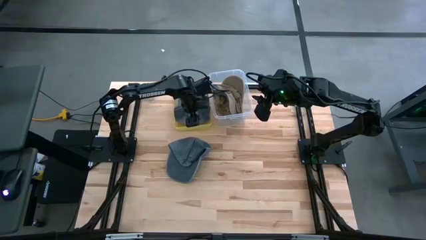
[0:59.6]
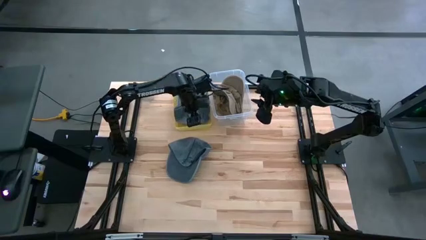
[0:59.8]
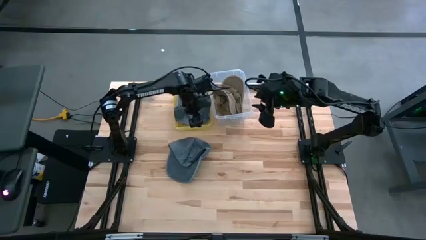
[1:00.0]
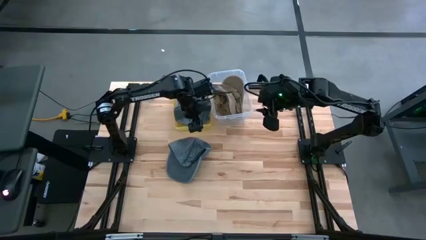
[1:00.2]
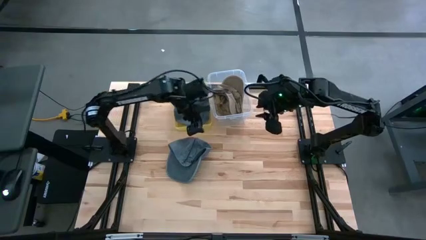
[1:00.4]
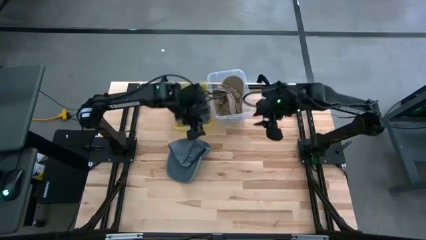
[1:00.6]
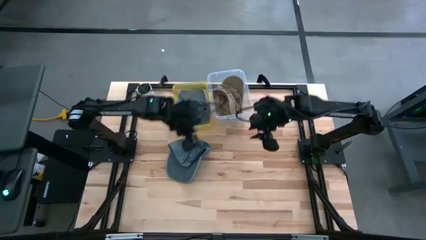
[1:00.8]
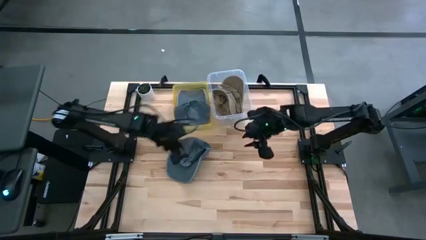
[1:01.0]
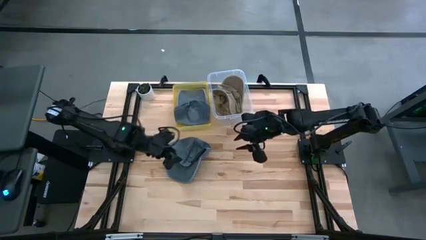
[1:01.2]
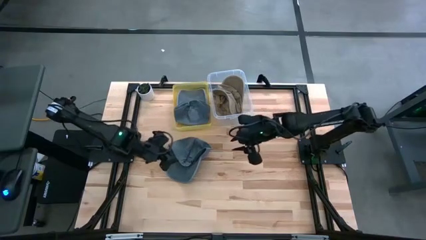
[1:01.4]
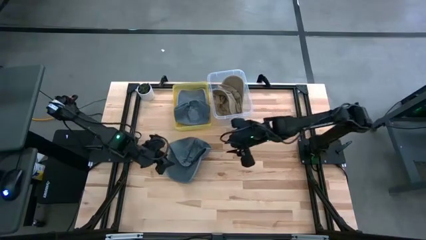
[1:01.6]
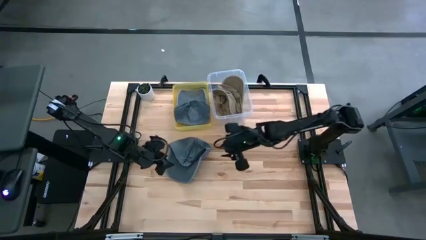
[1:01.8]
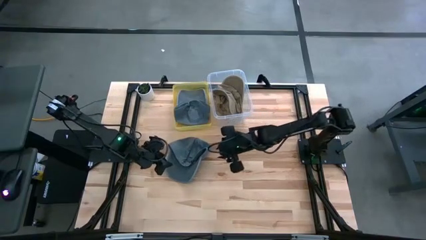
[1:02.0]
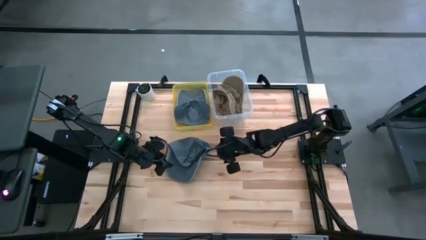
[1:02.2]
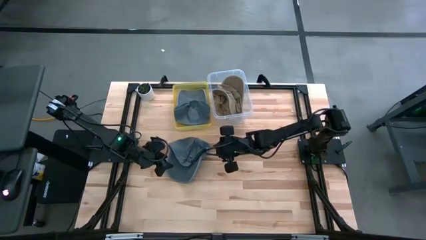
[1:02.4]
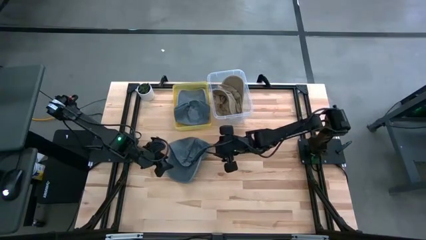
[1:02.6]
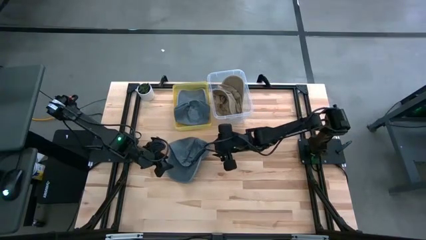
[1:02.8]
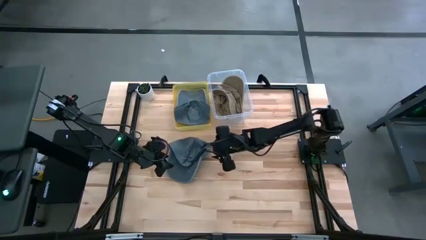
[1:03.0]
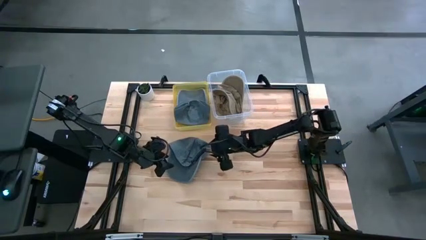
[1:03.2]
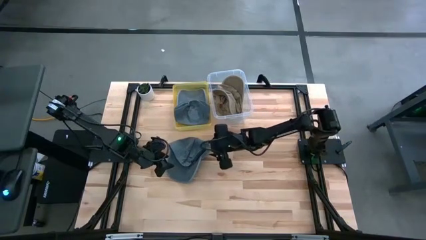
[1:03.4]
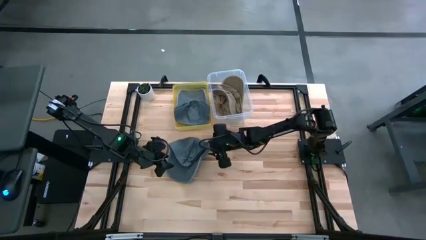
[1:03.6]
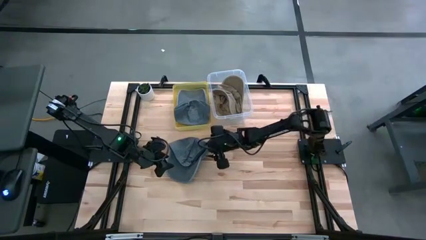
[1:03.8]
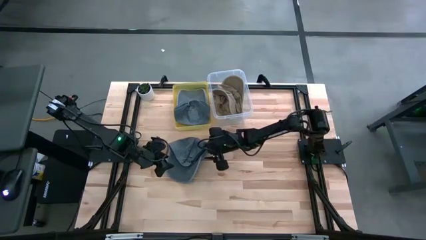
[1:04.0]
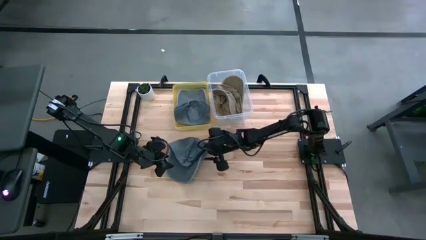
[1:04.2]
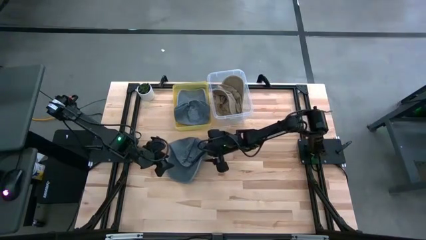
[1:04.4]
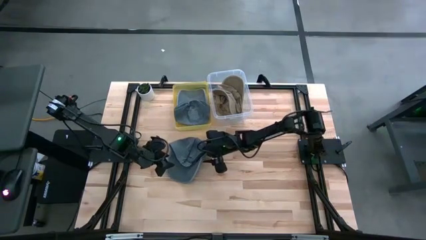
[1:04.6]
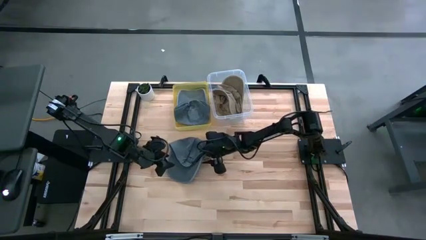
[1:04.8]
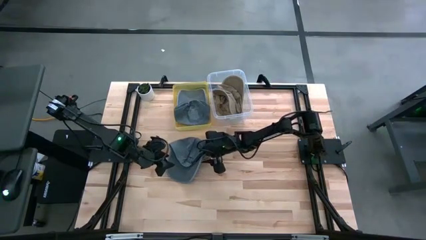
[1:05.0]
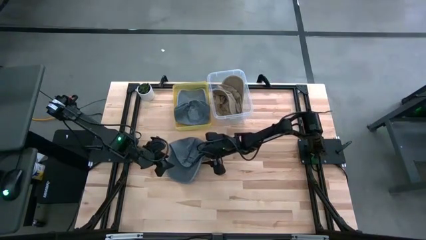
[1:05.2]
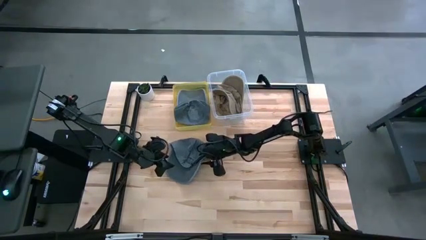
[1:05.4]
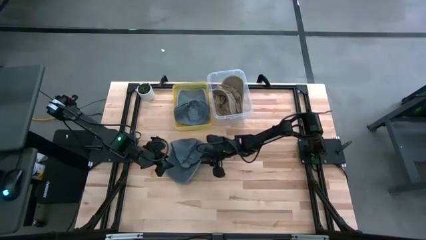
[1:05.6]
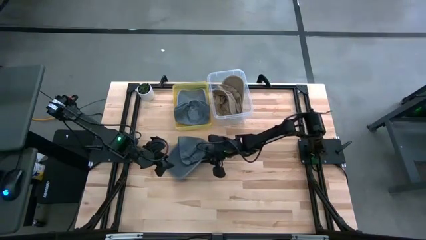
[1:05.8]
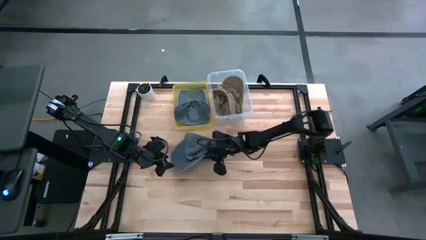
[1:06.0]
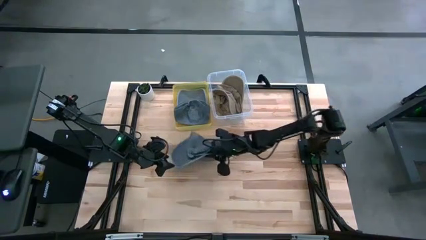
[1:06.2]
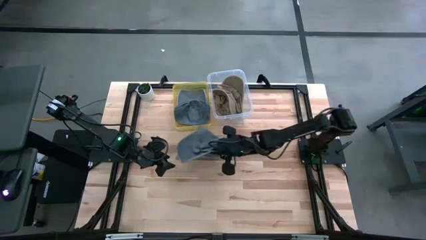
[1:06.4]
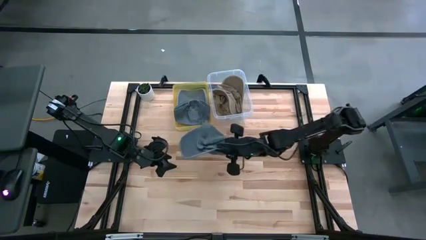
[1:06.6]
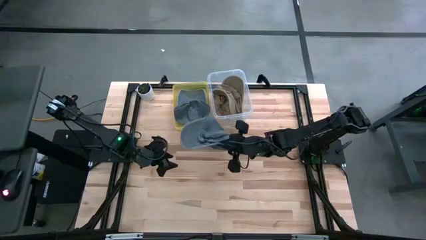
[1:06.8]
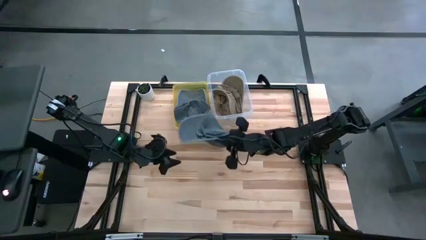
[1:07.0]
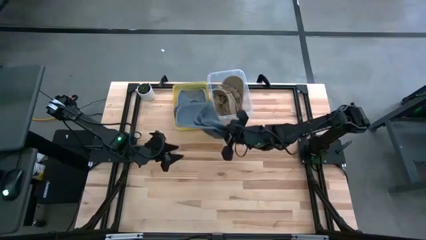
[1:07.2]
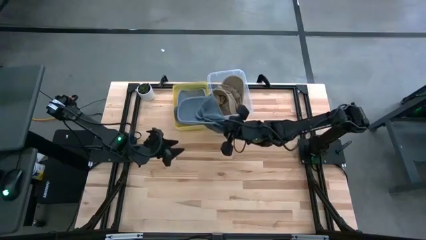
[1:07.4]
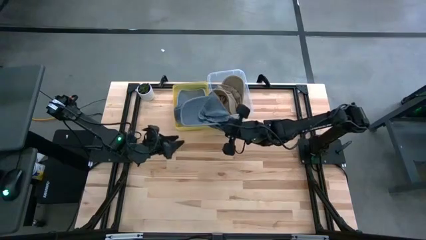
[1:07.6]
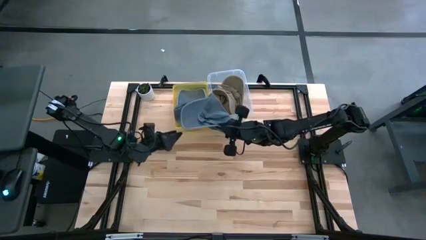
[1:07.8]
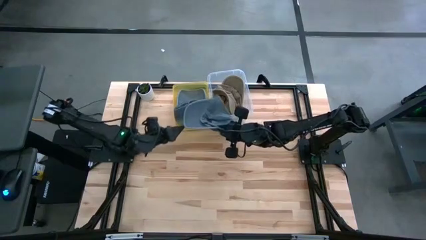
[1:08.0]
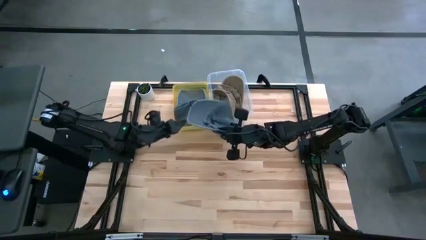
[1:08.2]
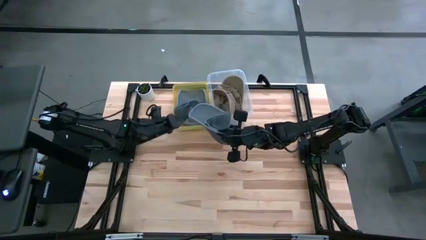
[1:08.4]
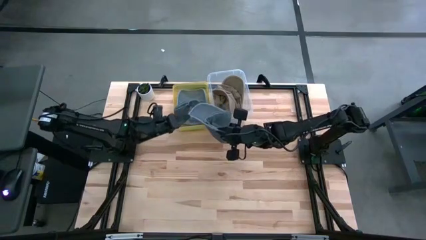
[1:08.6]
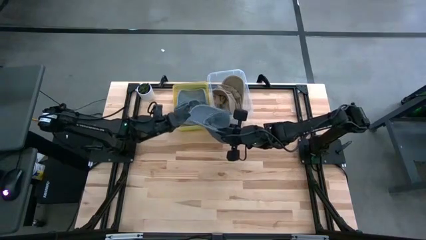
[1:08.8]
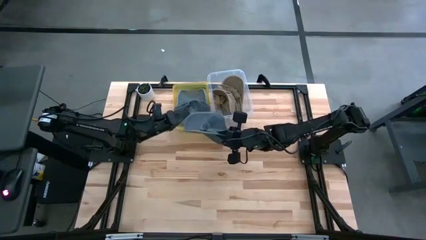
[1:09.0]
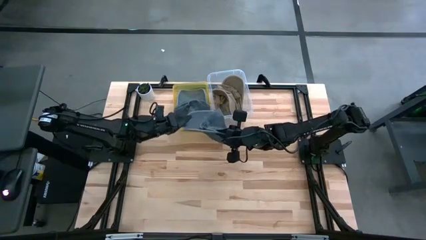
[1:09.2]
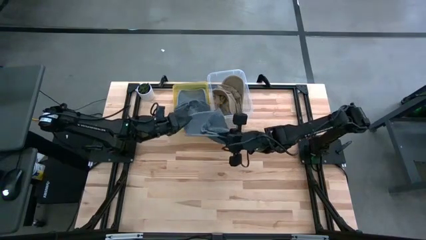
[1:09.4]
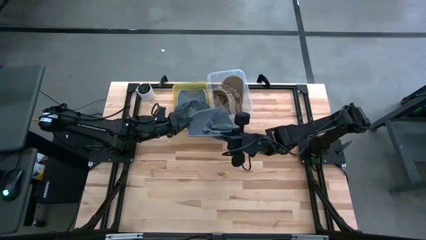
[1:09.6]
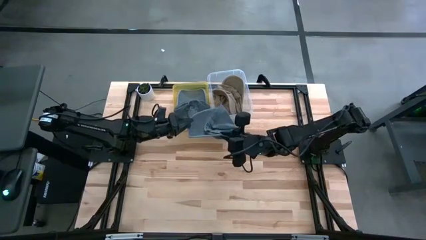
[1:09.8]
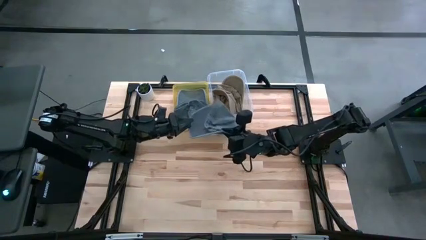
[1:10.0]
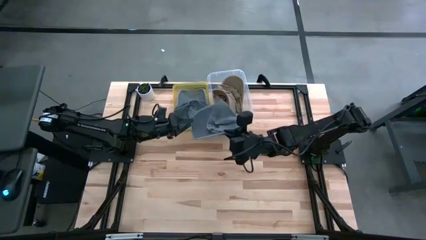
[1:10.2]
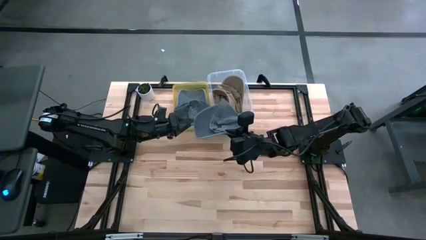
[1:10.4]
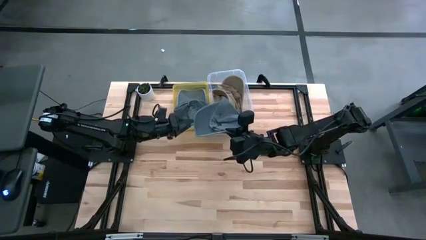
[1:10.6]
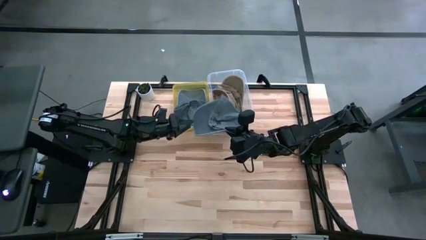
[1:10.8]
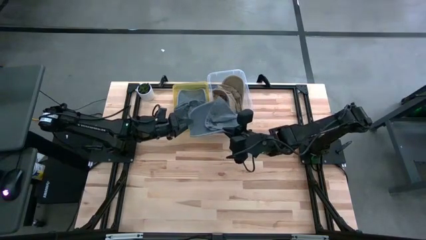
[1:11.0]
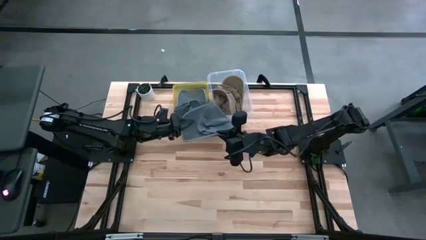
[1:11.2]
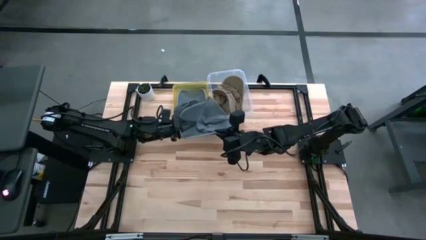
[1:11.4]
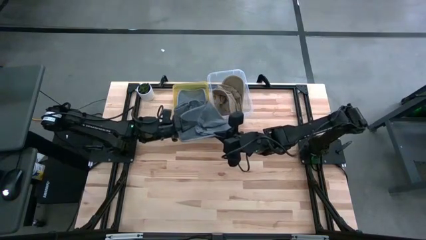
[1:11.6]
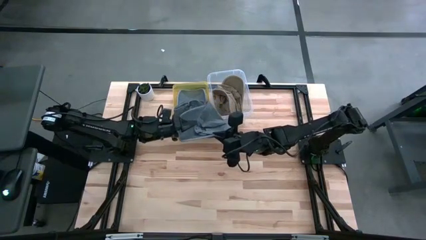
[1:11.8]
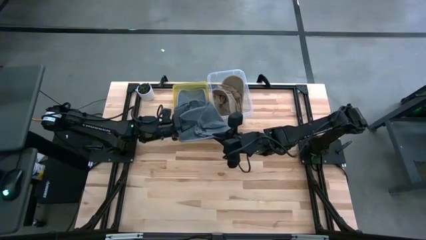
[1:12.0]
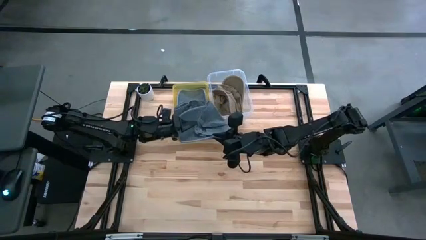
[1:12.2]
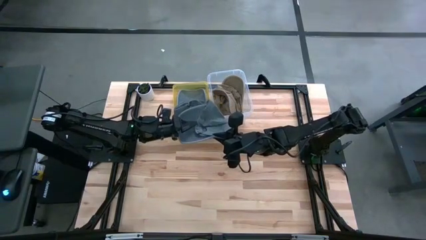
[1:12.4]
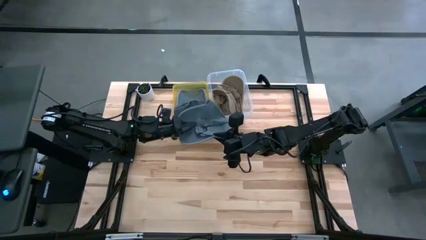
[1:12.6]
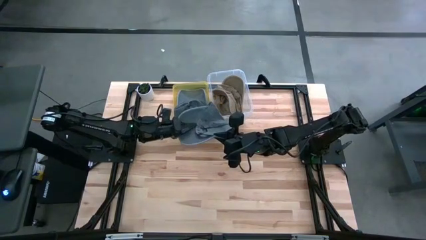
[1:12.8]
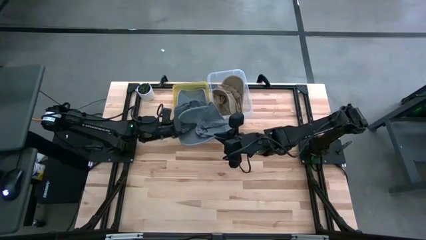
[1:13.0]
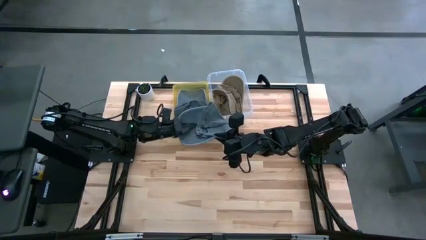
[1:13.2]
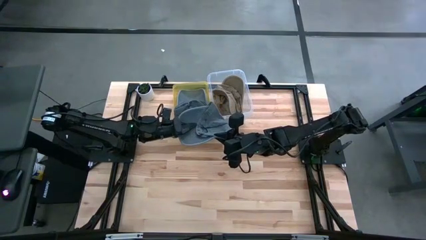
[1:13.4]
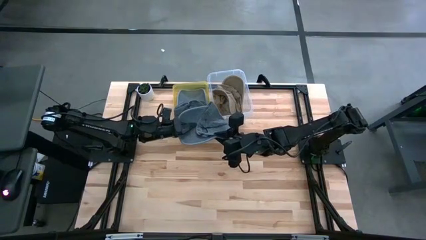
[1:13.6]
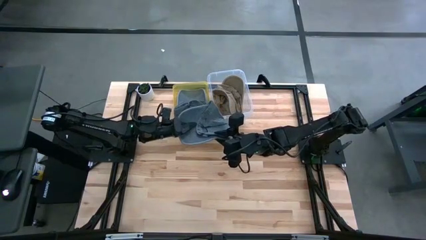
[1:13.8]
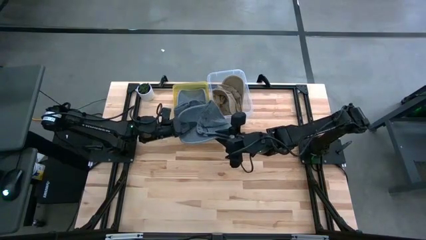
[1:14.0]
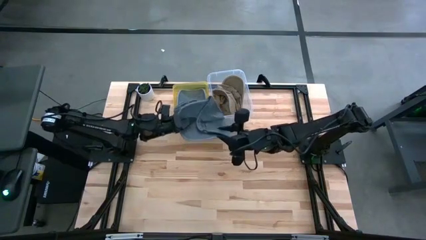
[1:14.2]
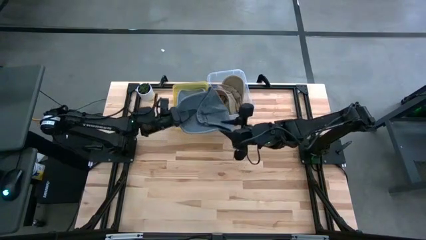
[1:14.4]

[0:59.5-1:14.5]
Task: Pick & Place hat
Put the blue cap into the yellow bin
